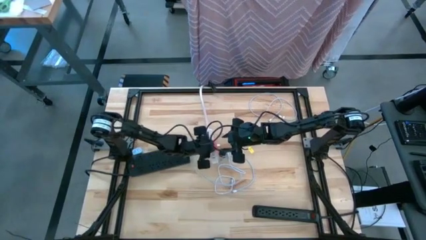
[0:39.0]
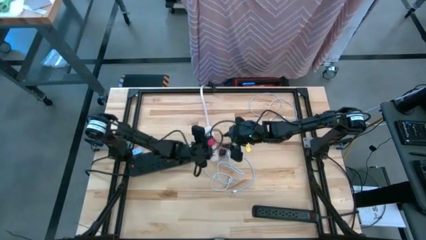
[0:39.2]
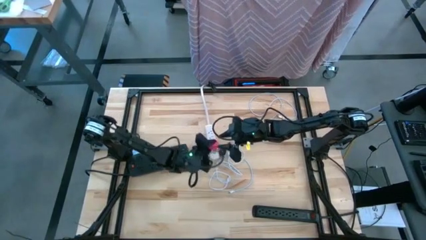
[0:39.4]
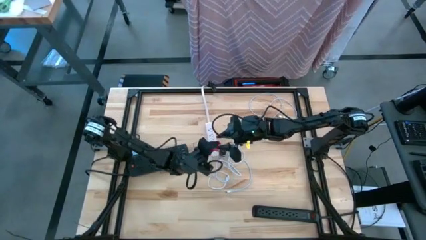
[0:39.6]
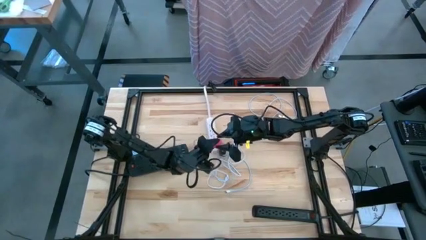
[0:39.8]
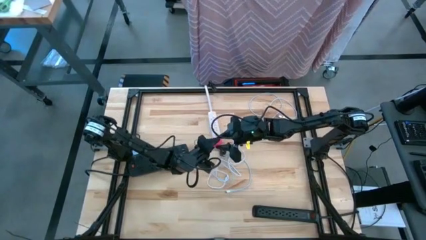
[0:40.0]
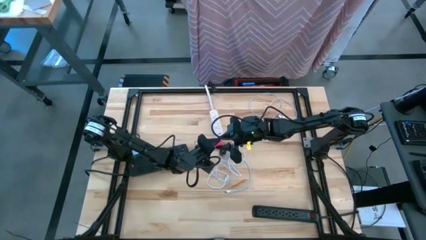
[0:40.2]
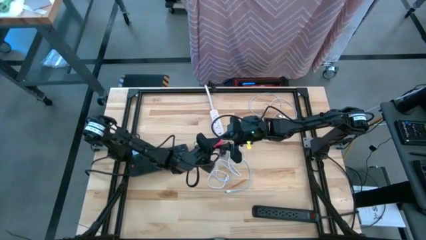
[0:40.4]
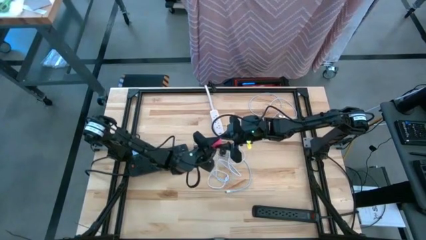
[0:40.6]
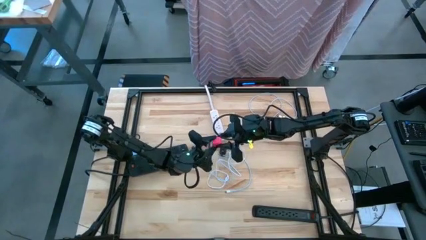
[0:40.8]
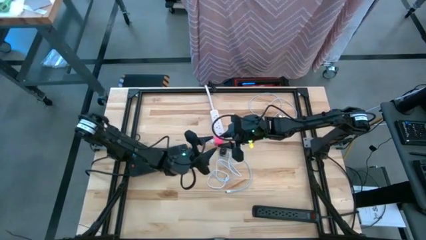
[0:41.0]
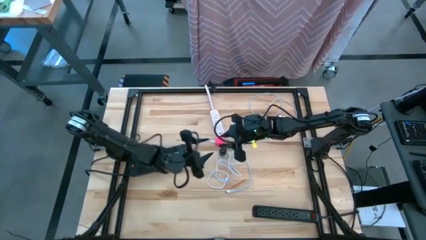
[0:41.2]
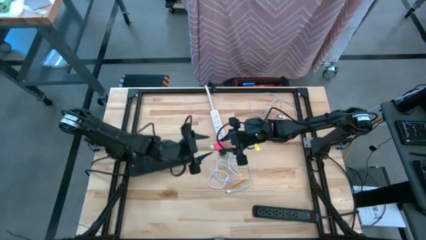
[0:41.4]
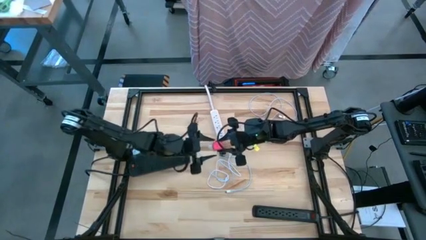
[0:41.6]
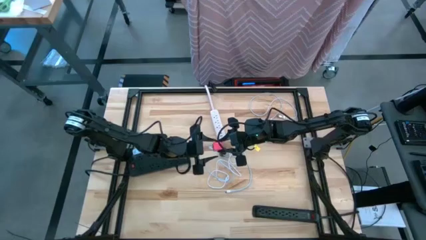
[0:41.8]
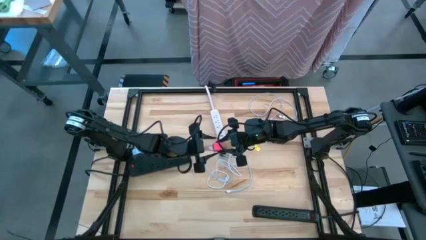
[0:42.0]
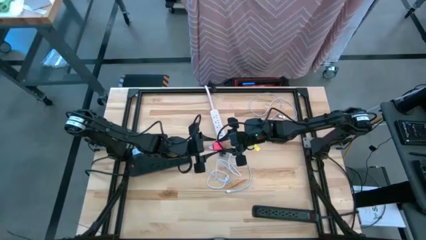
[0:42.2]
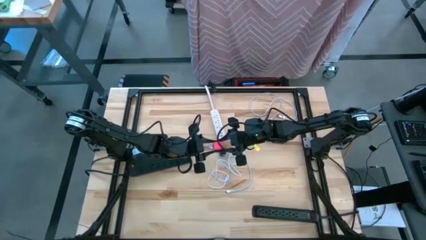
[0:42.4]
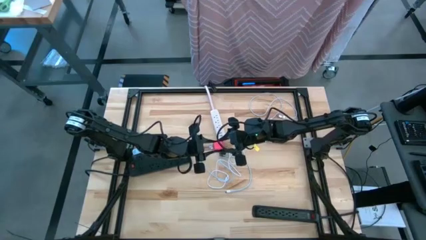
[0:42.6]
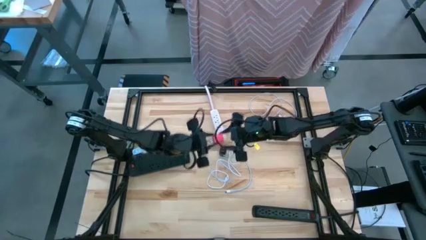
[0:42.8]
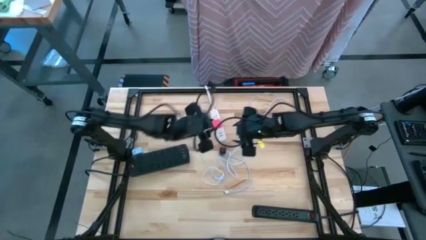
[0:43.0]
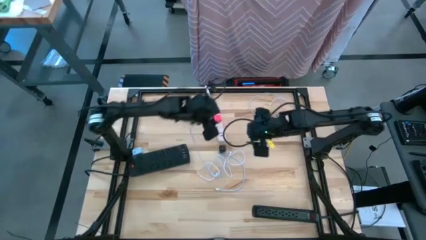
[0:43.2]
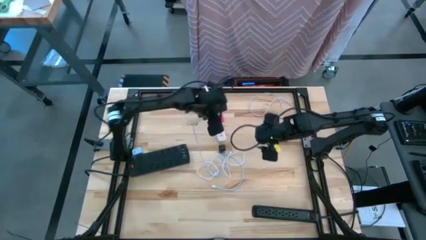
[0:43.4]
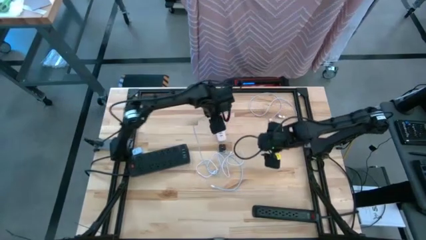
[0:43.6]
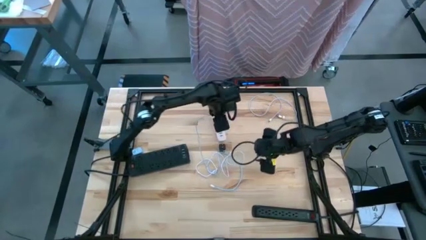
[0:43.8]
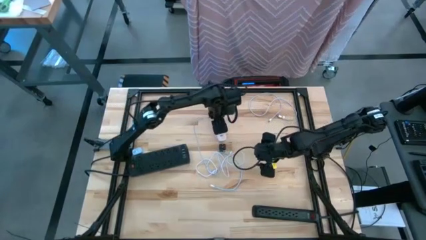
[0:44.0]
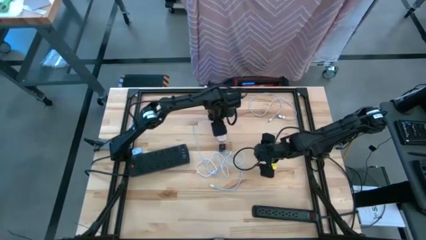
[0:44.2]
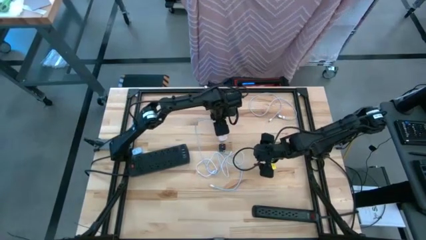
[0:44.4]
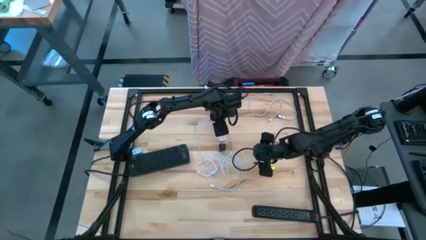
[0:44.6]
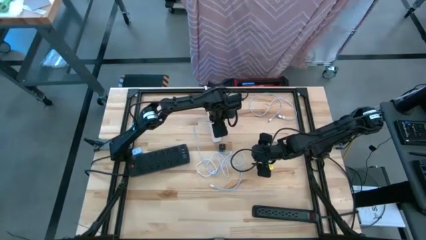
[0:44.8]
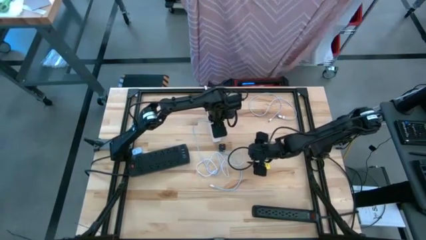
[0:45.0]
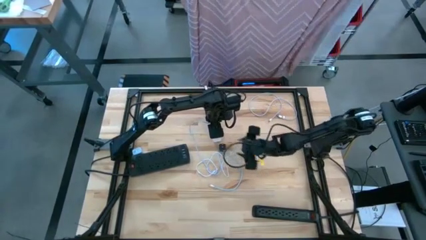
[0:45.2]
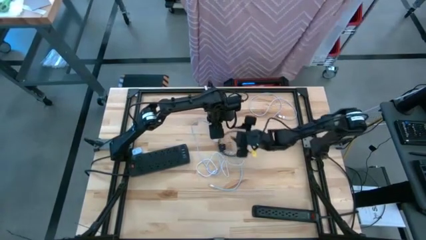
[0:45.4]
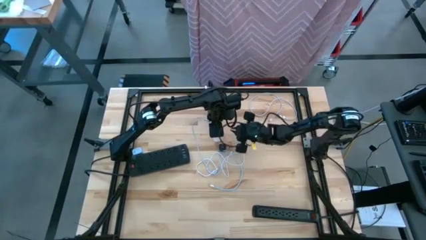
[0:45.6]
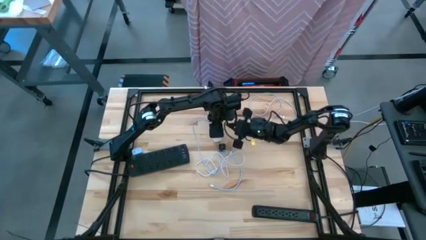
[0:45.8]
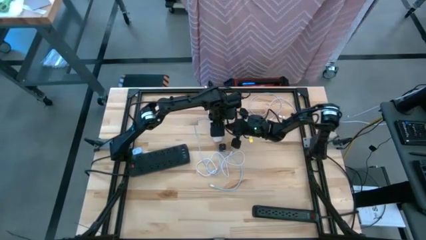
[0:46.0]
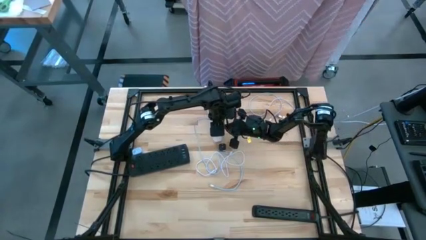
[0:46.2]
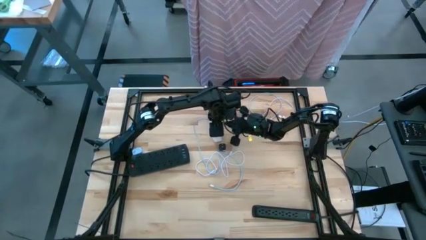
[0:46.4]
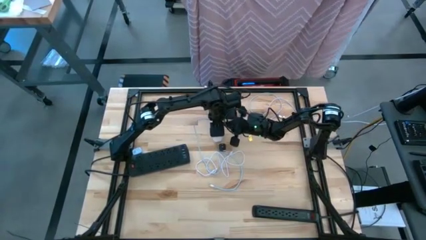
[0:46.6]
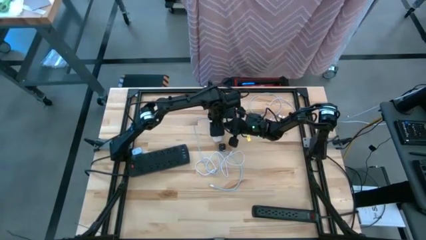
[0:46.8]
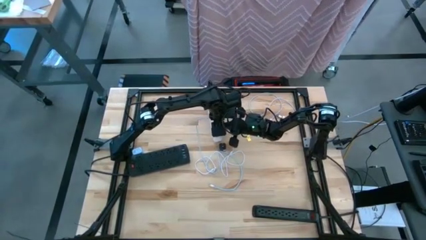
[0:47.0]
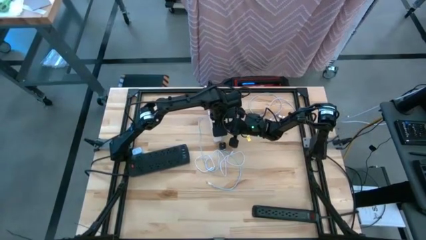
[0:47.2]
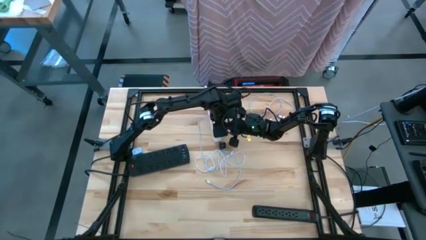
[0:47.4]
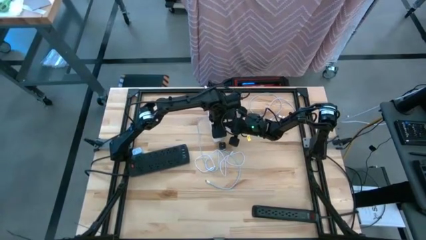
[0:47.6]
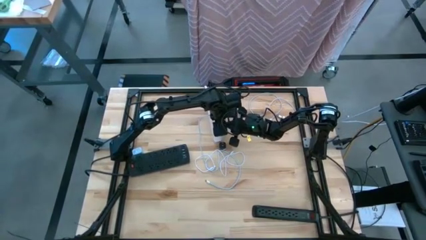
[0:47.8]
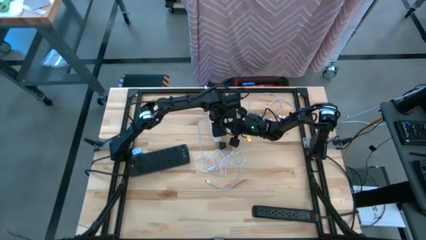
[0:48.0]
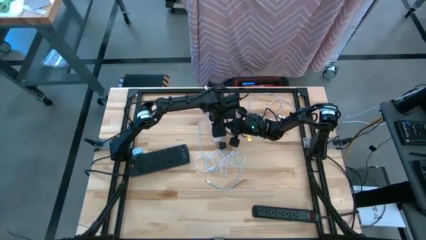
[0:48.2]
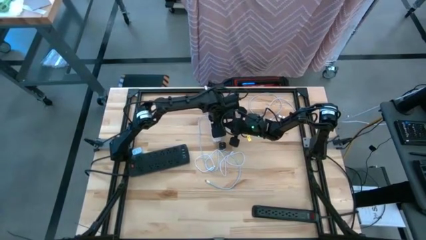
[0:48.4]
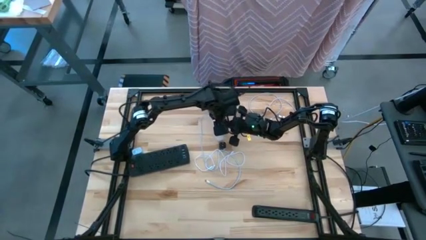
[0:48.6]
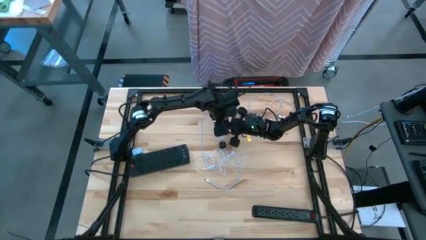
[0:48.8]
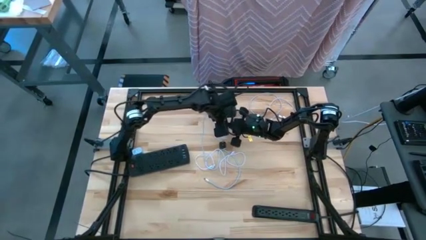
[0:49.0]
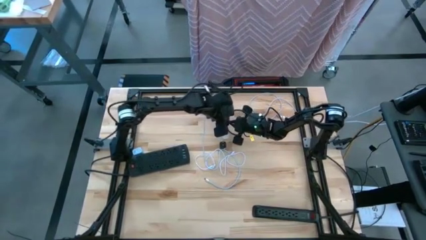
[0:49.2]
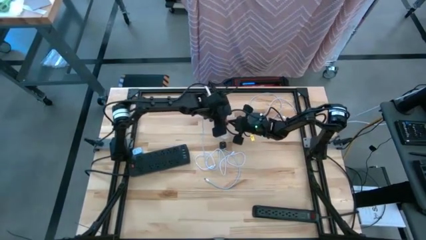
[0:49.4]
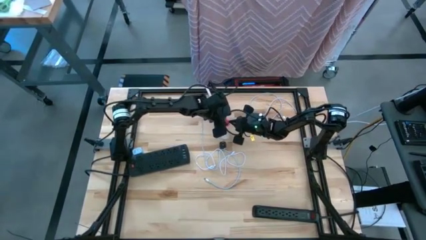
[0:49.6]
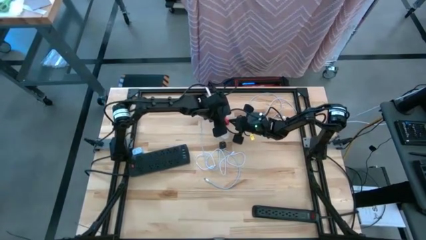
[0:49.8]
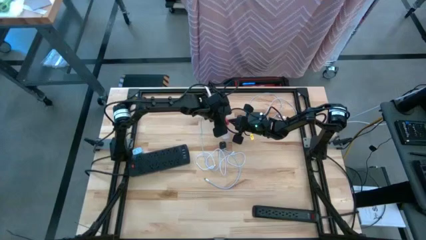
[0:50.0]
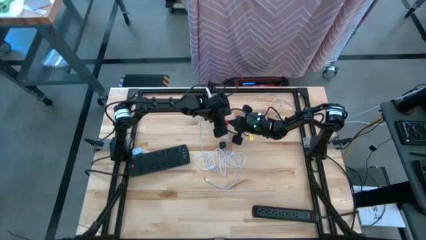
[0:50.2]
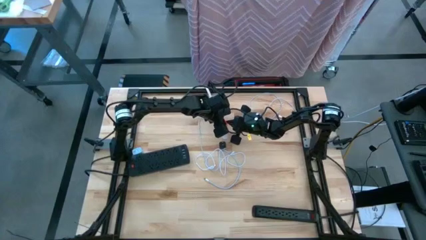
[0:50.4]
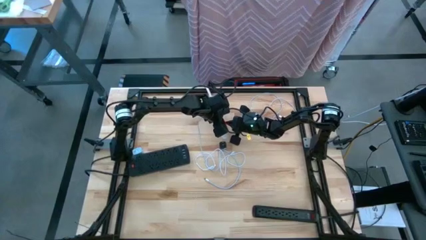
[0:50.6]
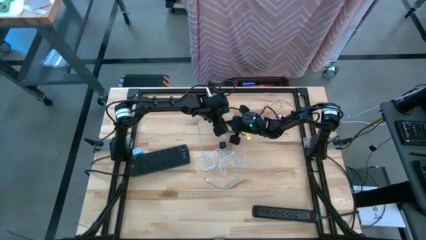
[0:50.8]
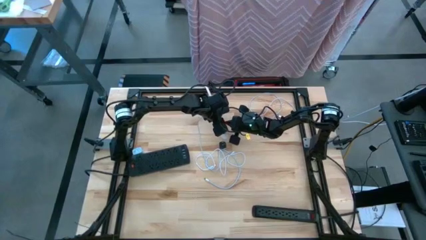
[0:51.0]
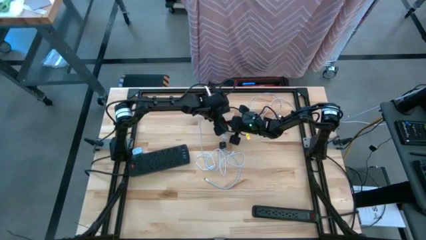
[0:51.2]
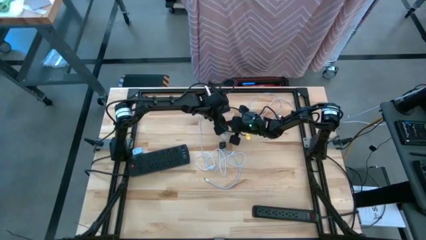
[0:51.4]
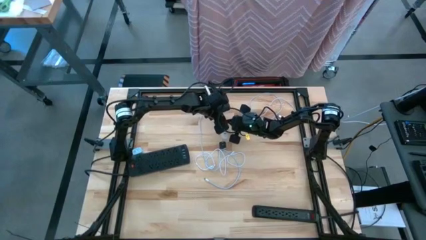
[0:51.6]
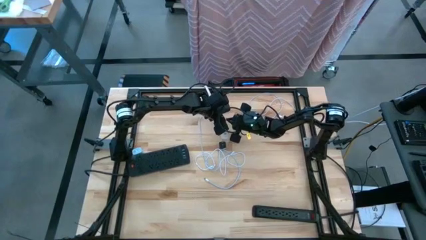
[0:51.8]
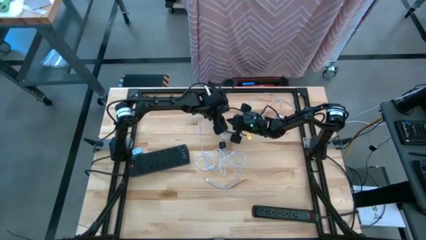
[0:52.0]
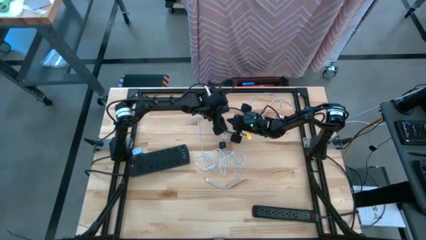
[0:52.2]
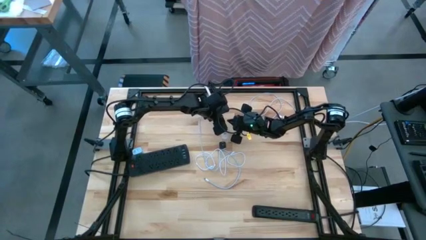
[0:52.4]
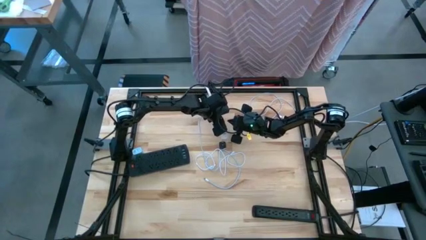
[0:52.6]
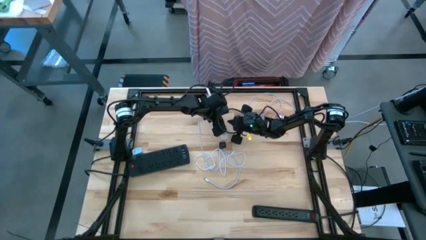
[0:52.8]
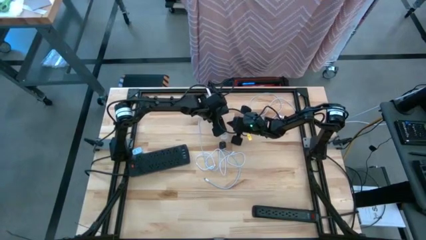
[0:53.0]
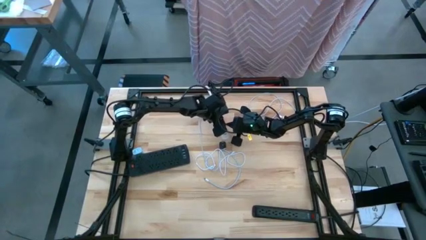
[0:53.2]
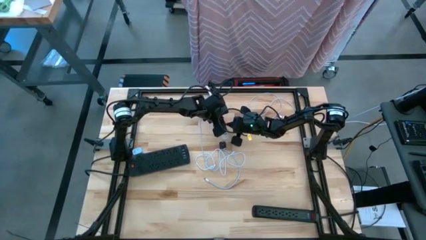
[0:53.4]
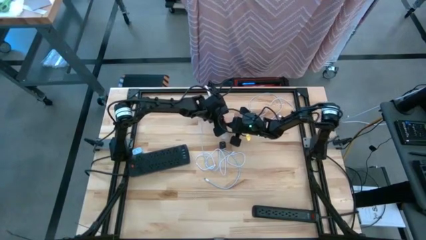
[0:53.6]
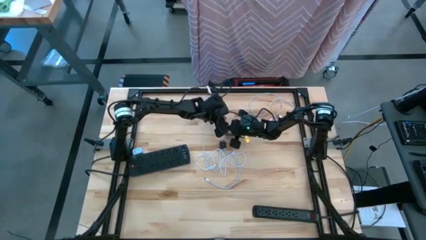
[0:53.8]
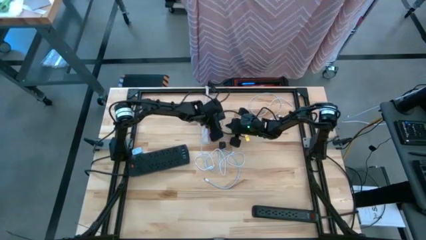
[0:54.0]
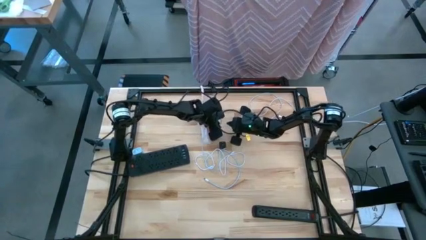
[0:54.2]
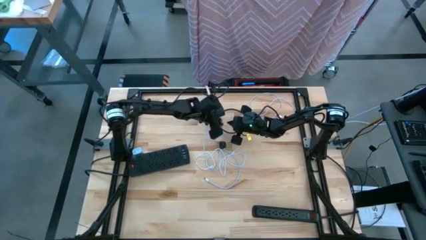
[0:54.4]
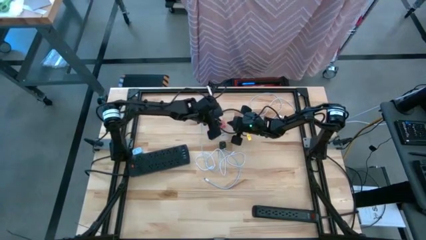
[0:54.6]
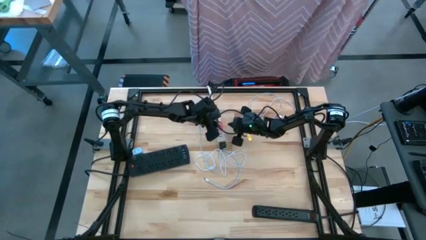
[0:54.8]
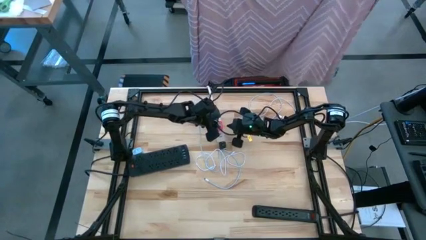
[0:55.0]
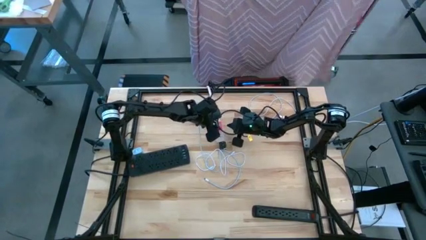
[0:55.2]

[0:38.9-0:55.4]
Task: Insert USB
Insert the pink charger adapter into the white outlet extension
